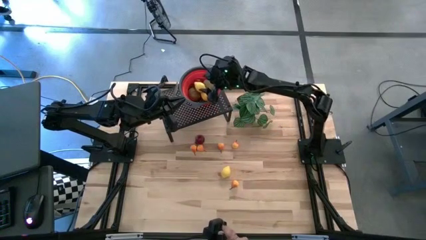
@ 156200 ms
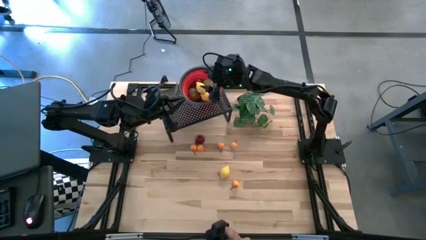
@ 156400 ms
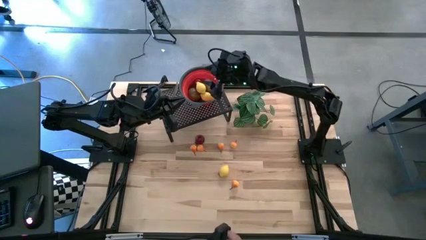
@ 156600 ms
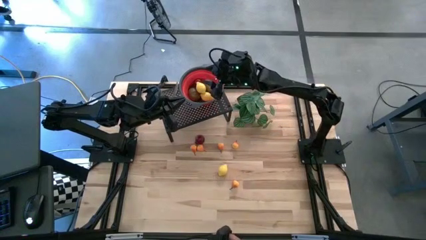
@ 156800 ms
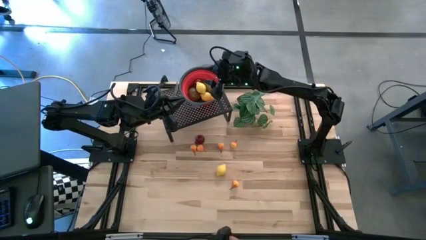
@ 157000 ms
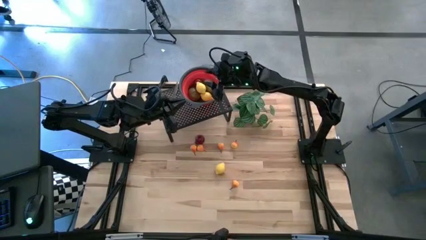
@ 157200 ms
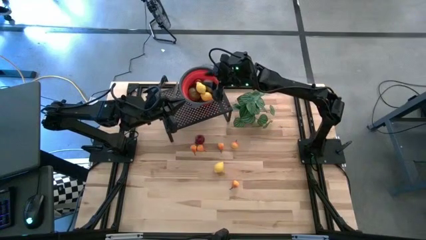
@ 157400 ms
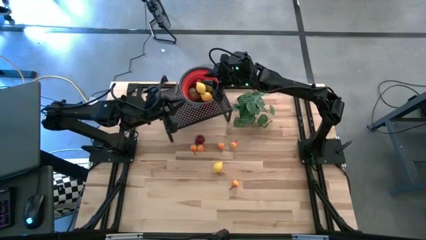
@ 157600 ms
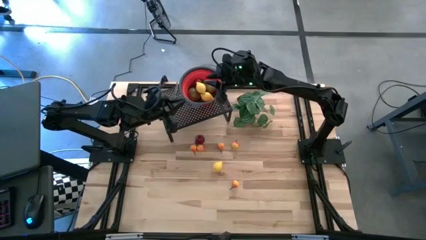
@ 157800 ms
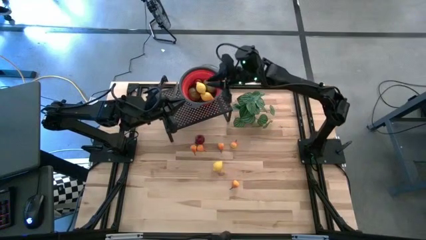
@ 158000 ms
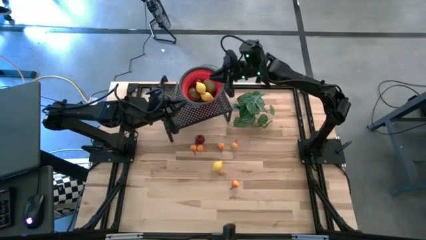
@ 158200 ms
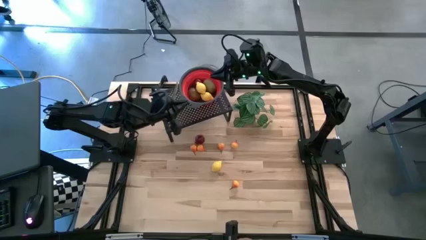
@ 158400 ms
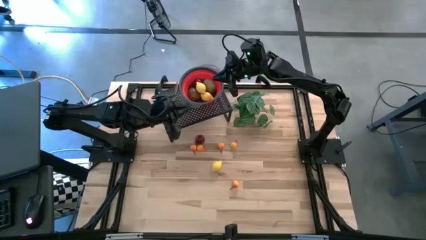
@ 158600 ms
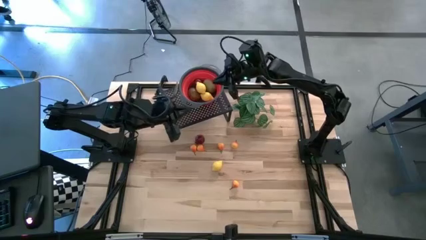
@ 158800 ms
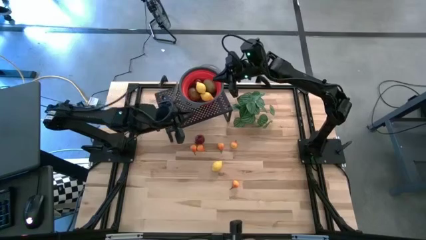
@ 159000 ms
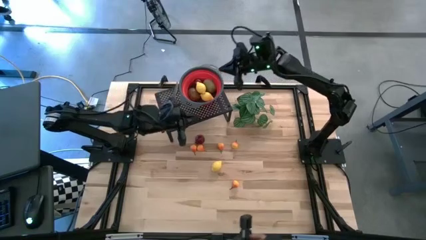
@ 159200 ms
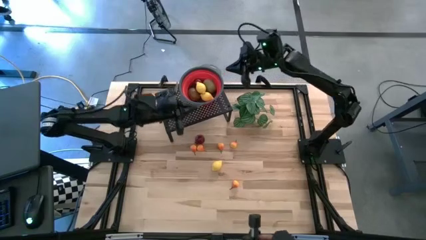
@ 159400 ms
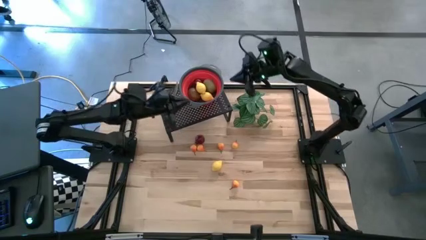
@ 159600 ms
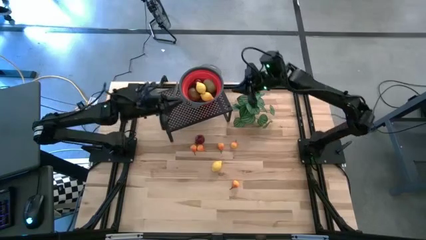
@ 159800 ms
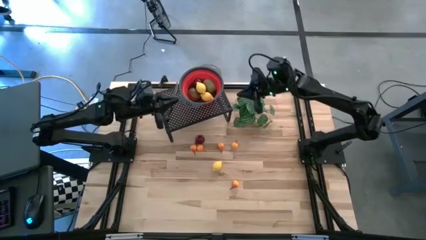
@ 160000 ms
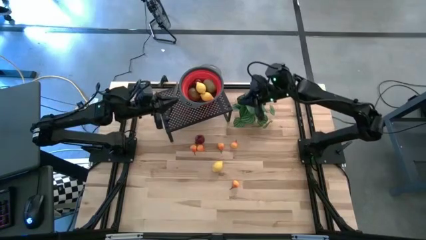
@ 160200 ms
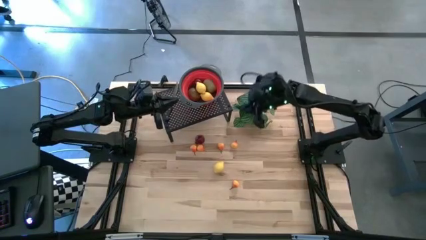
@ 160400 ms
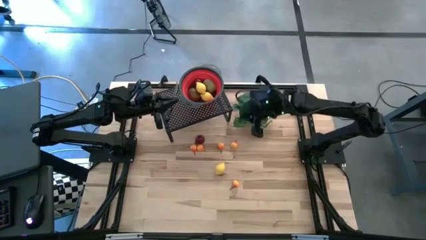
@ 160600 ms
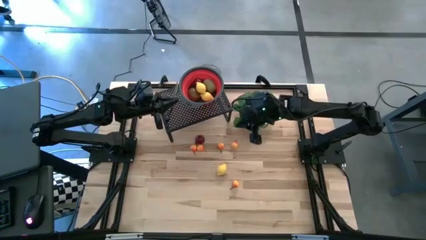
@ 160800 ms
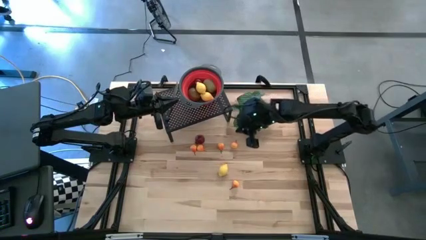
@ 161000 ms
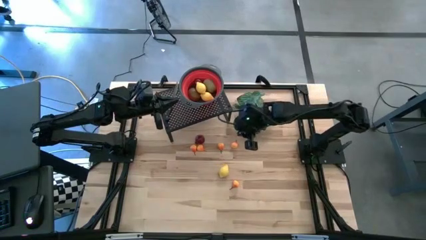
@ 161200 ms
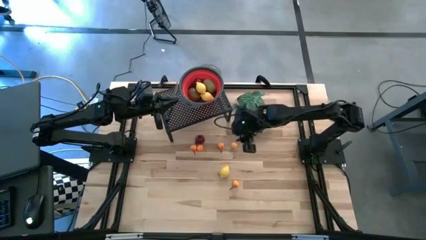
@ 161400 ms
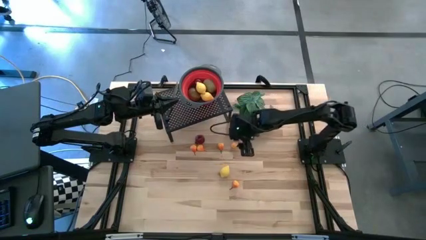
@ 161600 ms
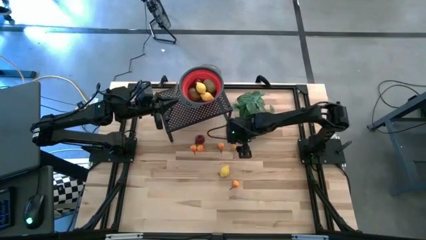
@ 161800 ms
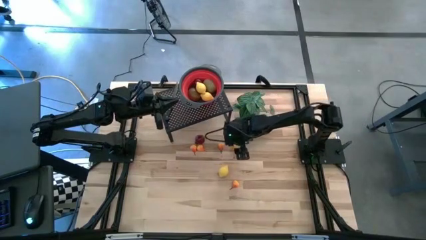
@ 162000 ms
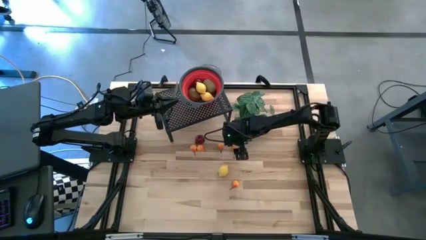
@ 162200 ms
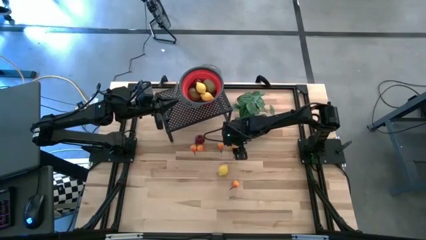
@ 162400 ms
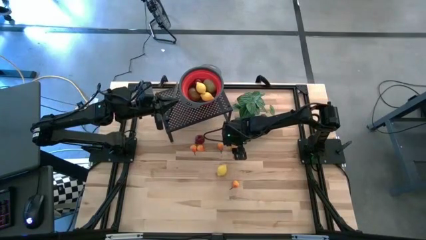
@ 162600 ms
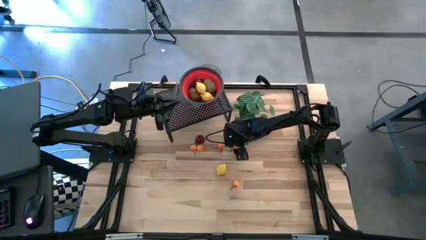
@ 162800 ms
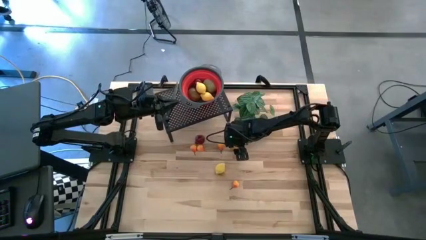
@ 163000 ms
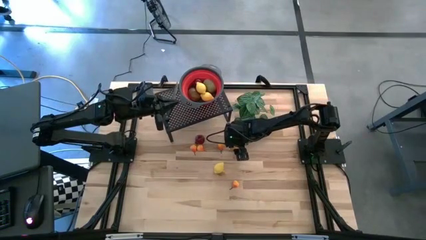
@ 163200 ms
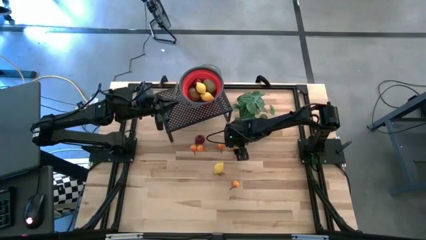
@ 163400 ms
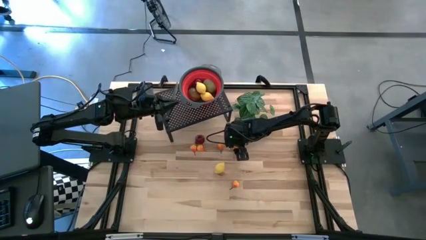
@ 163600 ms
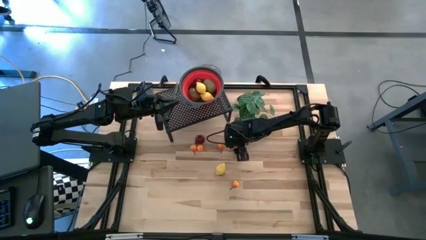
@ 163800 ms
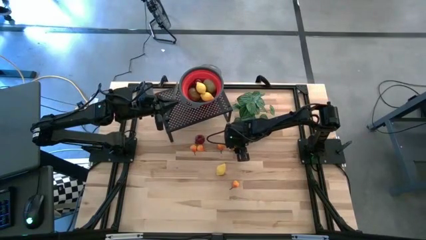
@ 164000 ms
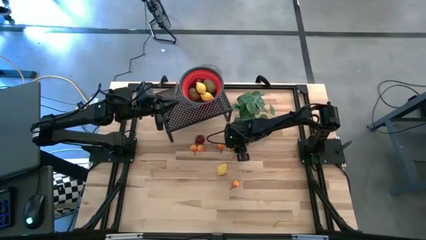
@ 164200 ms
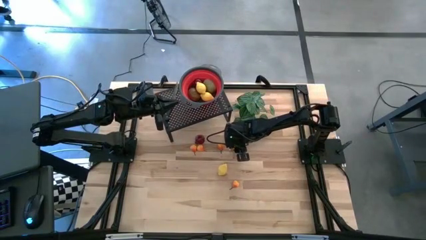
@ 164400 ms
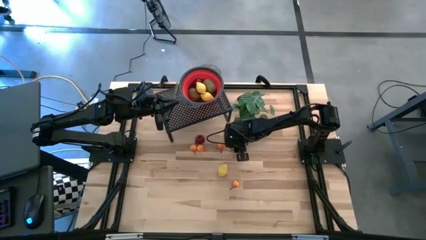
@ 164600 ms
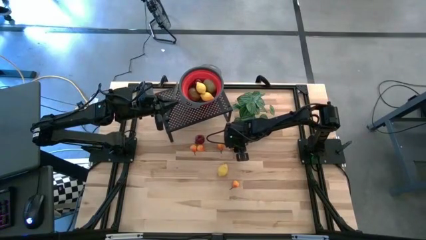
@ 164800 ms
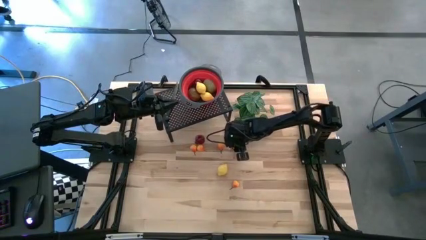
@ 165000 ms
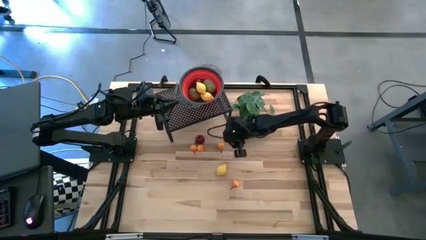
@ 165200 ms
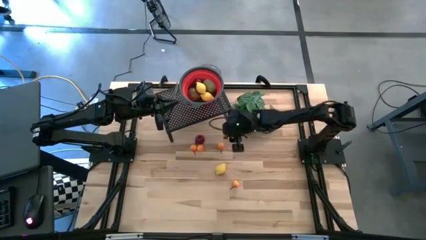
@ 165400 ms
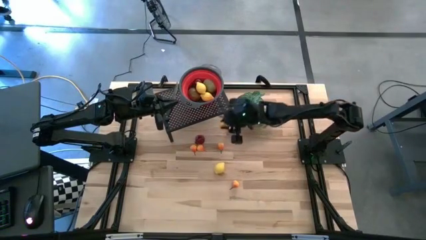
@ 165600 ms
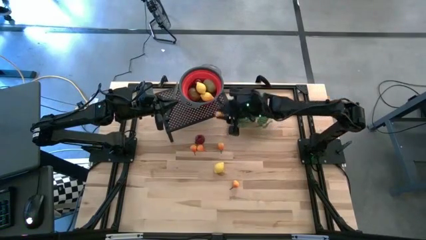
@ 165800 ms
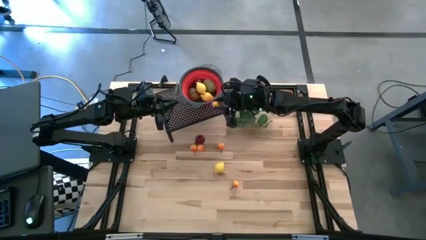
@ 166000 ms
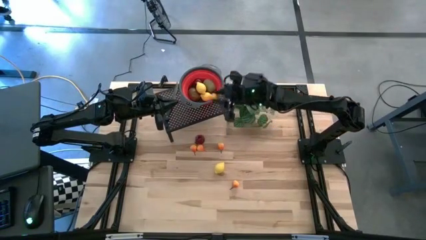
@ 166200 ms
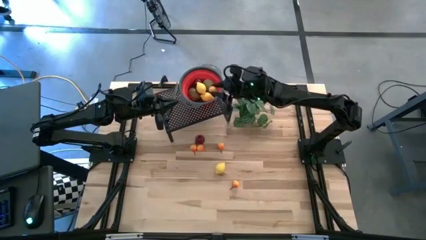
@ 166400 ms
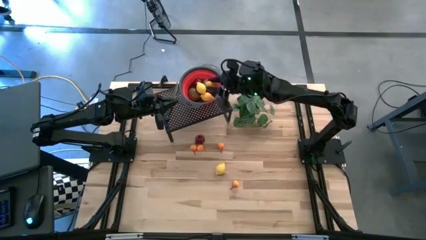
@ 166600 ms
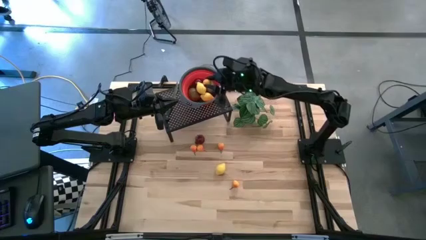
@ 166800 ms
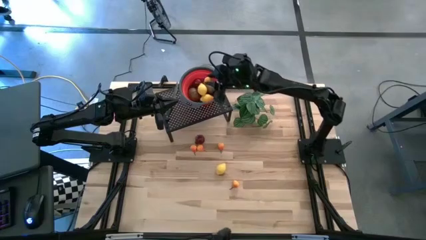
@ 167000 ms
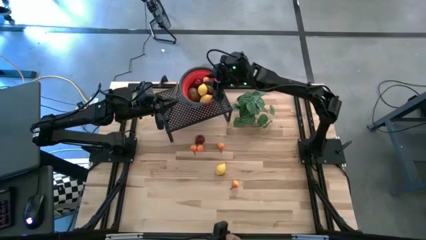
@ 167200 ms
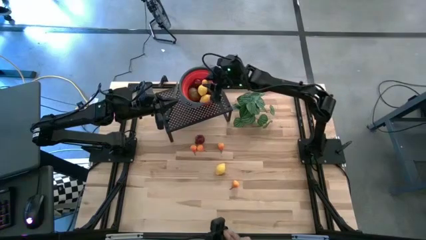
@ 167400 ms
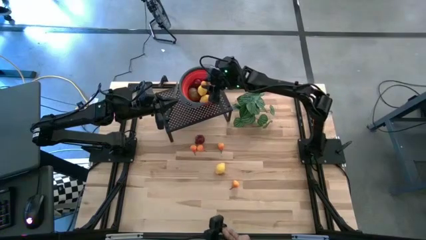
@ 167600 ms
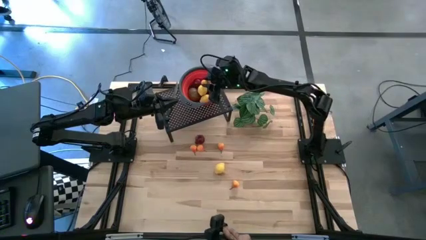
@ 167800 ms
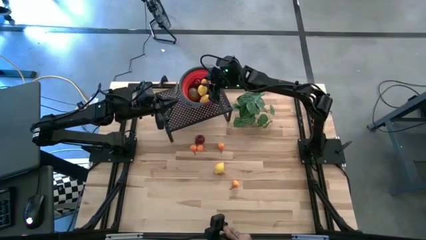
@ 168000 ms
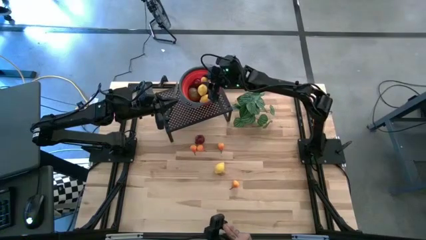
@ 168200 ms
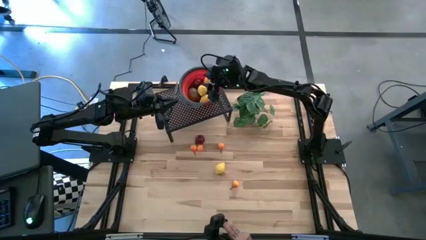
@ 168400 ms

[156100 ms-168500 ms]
Task: Pick & Place Fruit
Put the orange pear into the red basket on the shelf
